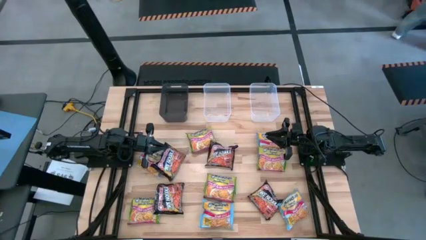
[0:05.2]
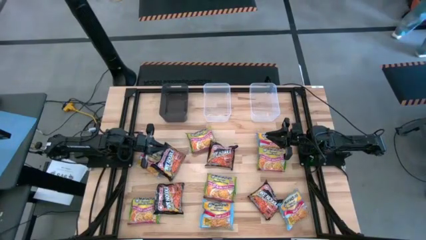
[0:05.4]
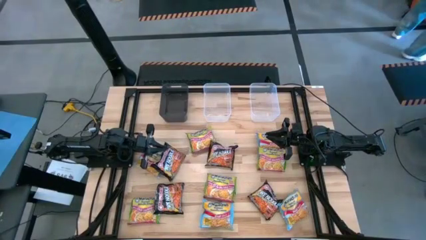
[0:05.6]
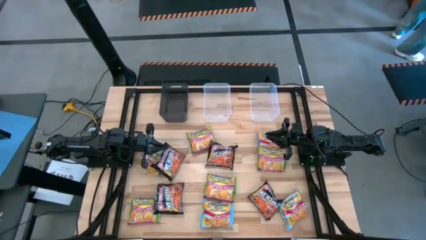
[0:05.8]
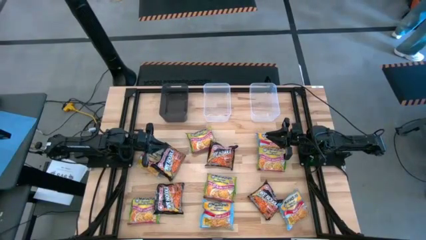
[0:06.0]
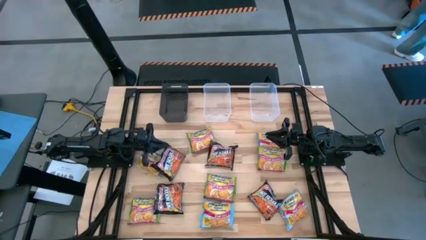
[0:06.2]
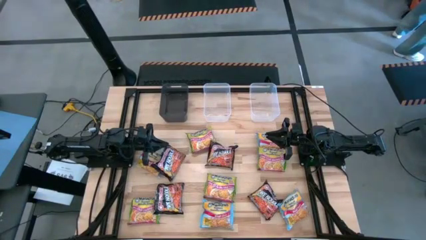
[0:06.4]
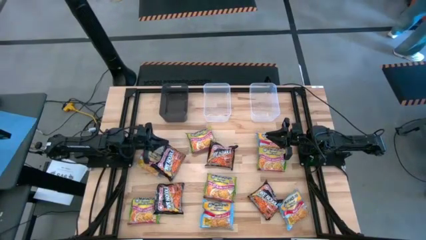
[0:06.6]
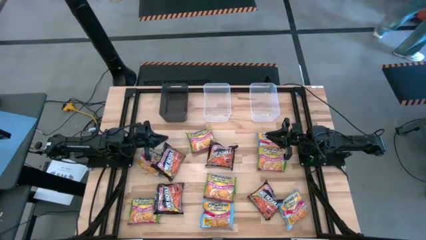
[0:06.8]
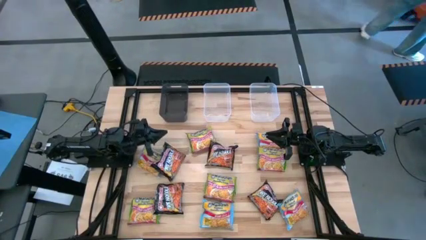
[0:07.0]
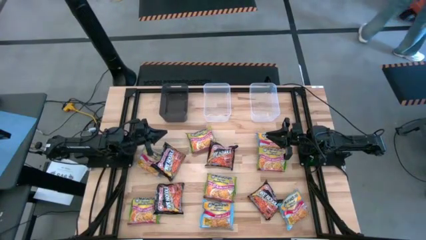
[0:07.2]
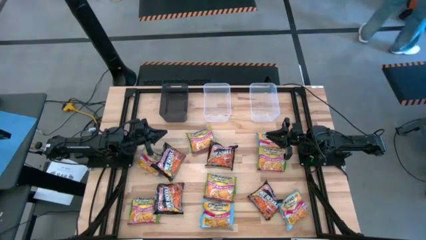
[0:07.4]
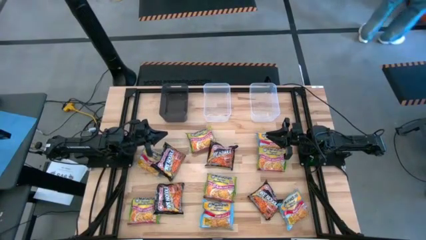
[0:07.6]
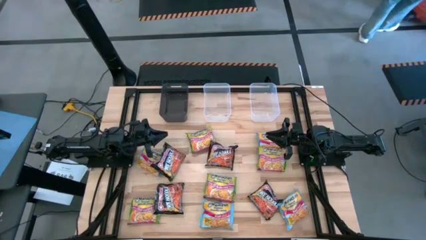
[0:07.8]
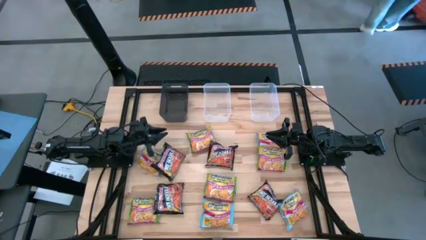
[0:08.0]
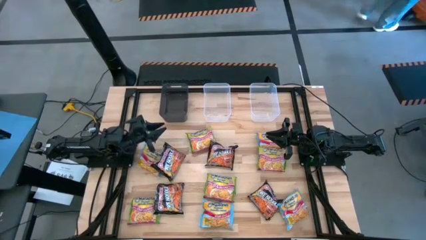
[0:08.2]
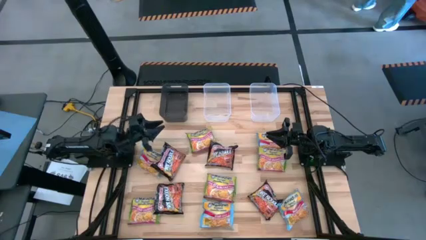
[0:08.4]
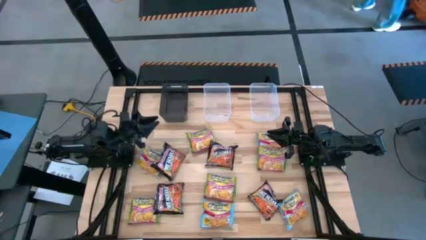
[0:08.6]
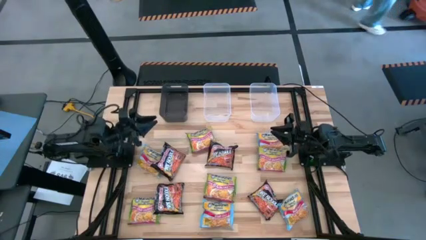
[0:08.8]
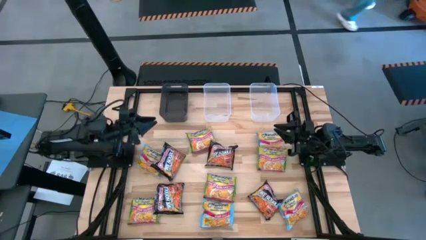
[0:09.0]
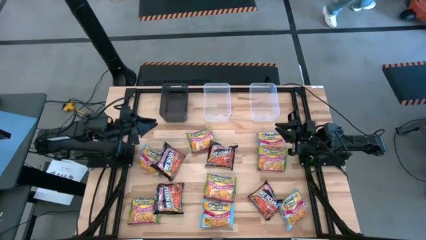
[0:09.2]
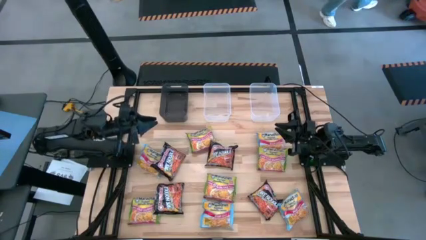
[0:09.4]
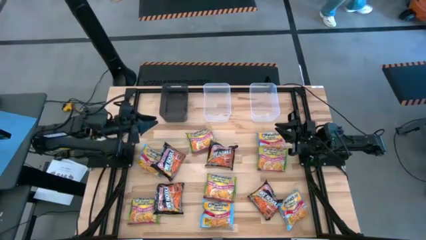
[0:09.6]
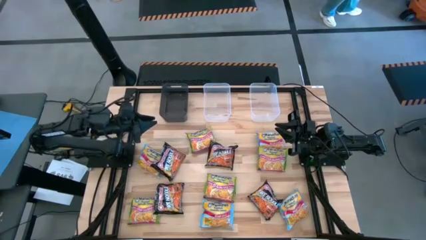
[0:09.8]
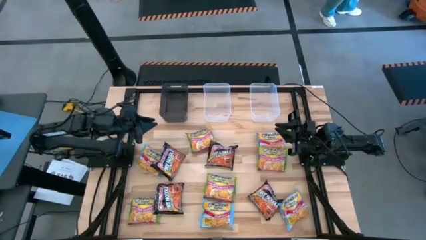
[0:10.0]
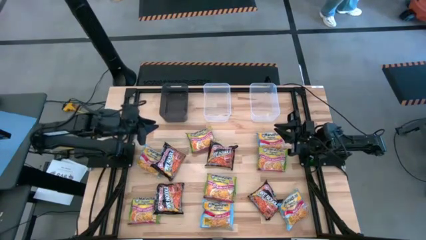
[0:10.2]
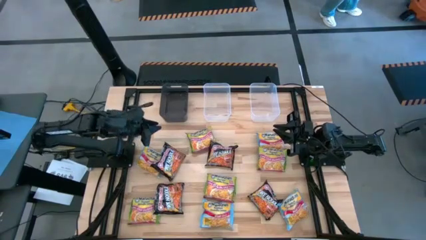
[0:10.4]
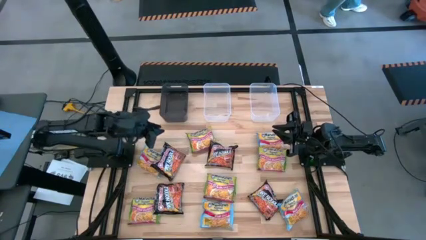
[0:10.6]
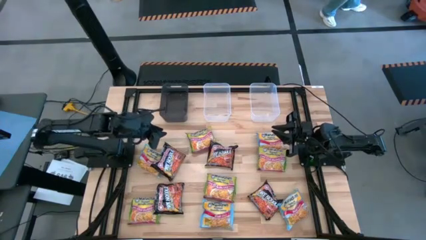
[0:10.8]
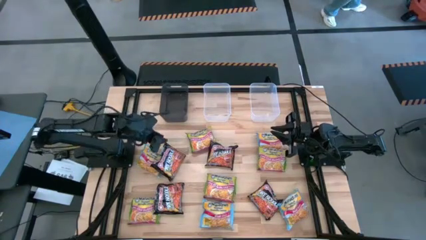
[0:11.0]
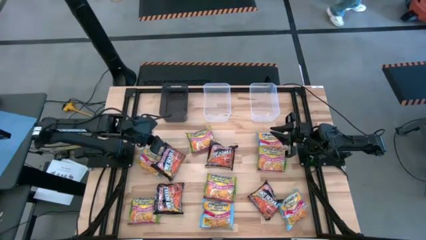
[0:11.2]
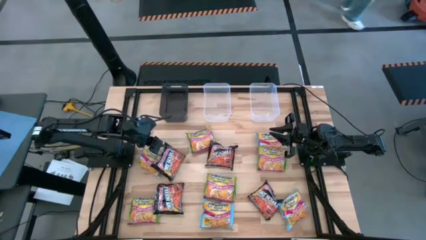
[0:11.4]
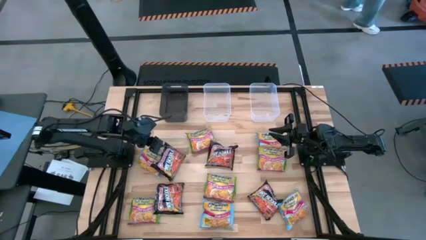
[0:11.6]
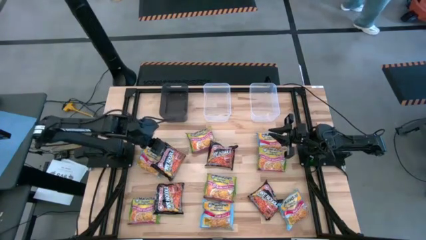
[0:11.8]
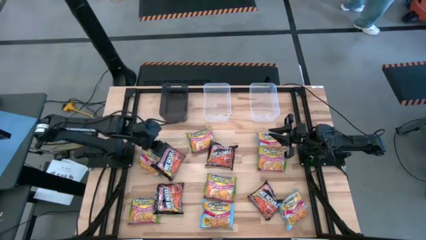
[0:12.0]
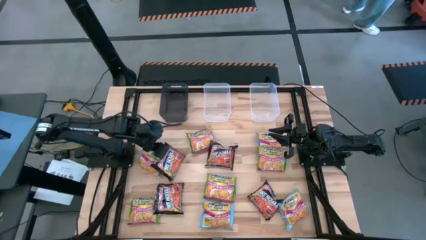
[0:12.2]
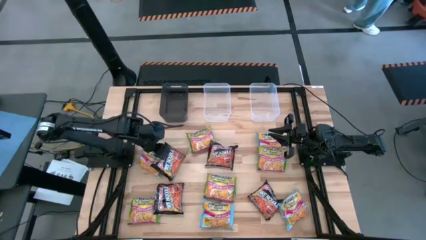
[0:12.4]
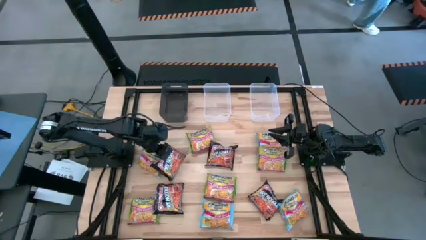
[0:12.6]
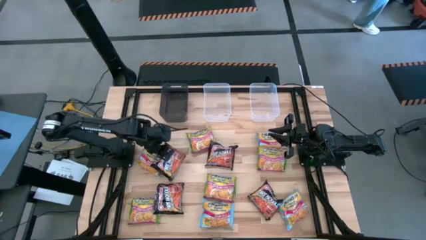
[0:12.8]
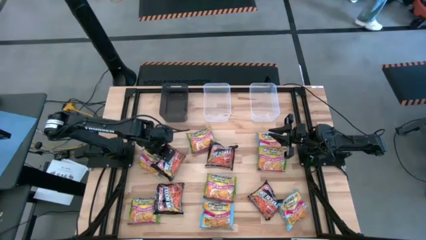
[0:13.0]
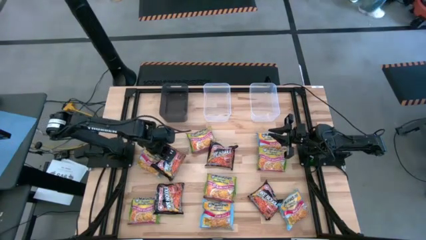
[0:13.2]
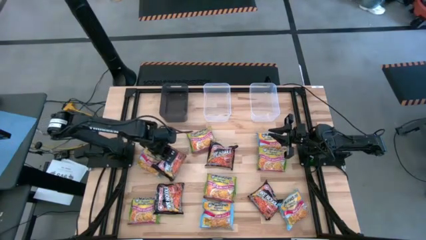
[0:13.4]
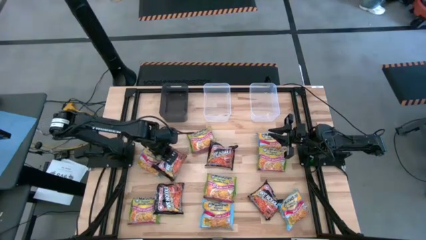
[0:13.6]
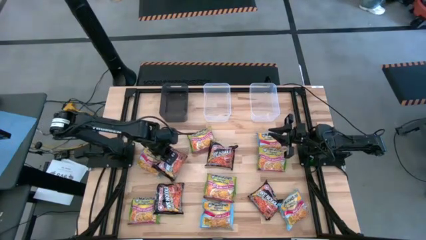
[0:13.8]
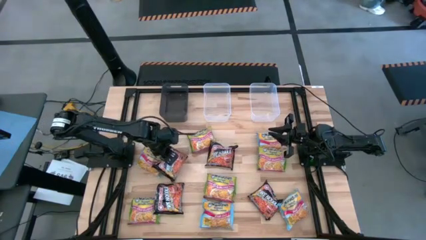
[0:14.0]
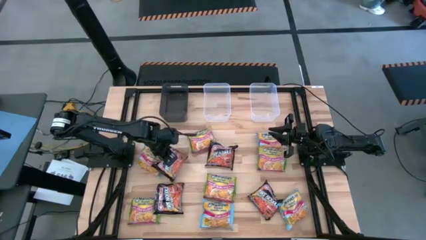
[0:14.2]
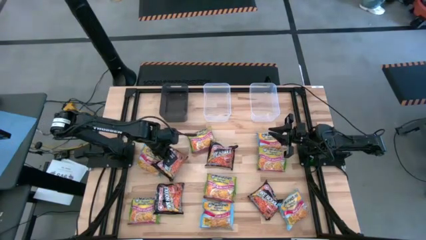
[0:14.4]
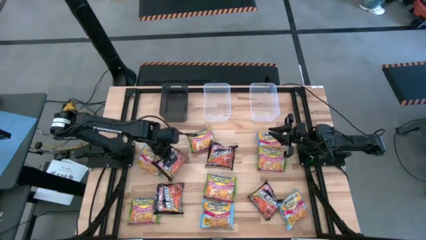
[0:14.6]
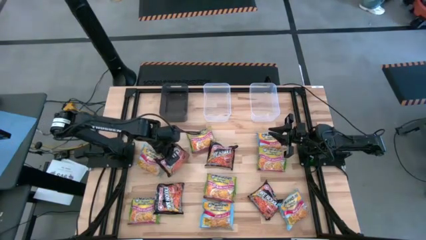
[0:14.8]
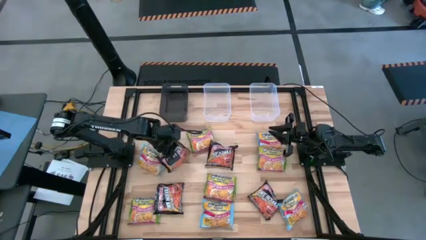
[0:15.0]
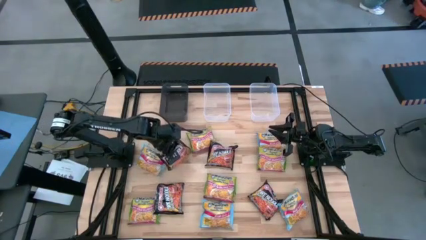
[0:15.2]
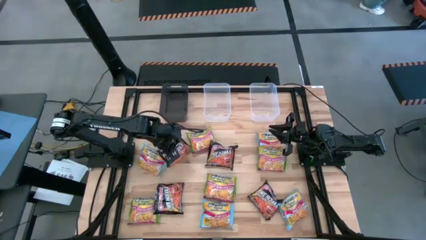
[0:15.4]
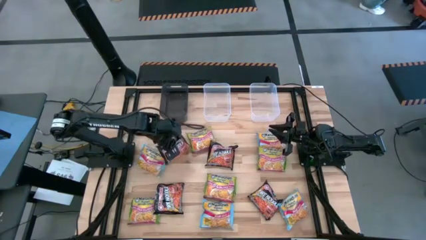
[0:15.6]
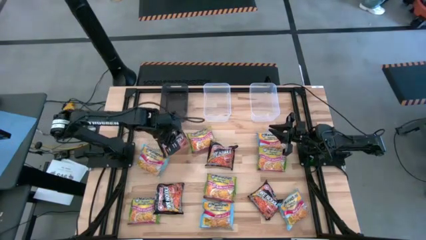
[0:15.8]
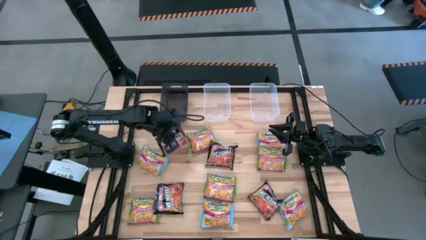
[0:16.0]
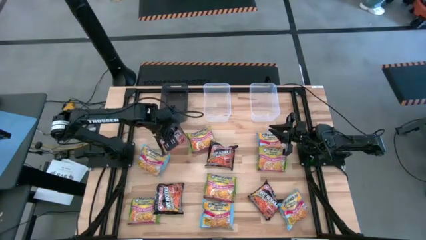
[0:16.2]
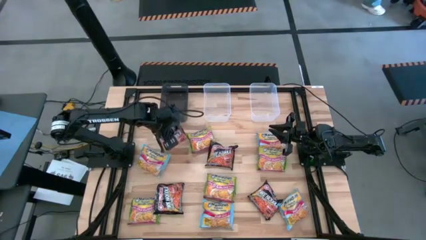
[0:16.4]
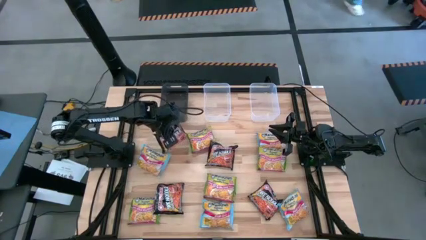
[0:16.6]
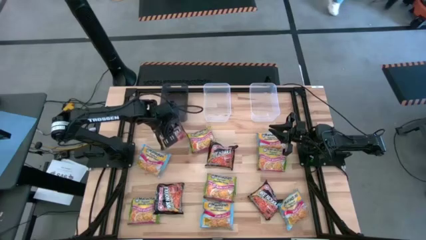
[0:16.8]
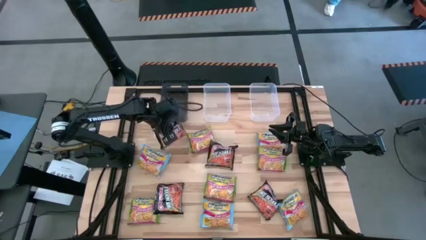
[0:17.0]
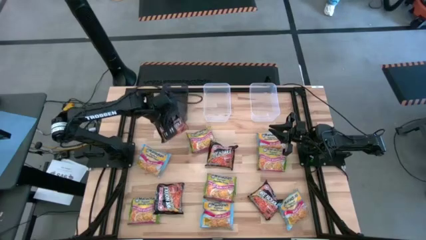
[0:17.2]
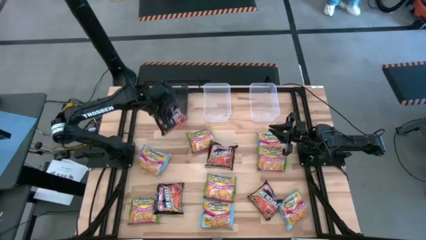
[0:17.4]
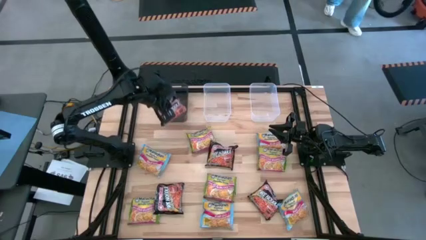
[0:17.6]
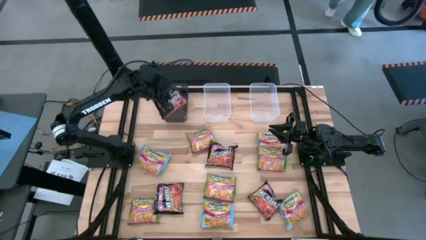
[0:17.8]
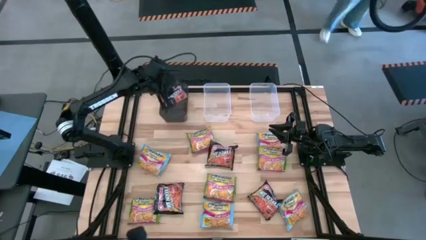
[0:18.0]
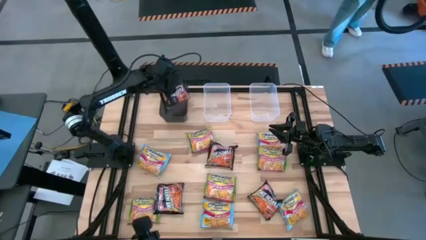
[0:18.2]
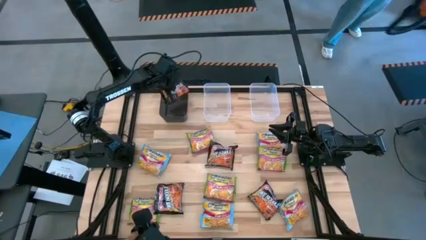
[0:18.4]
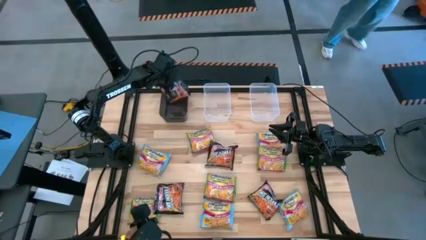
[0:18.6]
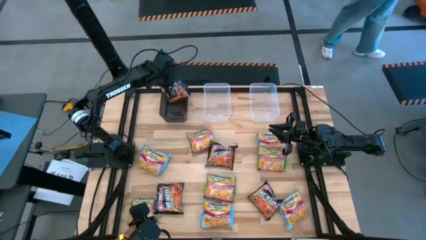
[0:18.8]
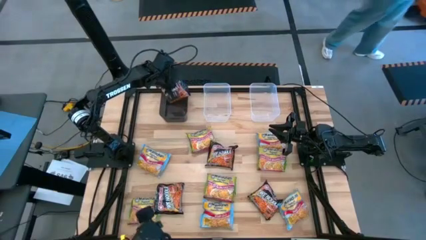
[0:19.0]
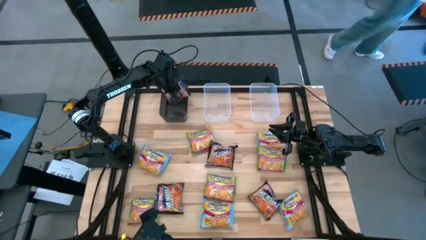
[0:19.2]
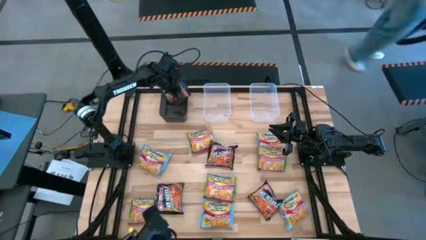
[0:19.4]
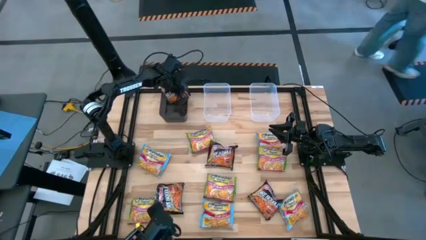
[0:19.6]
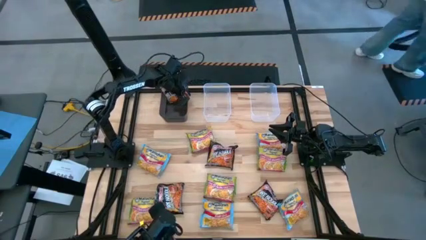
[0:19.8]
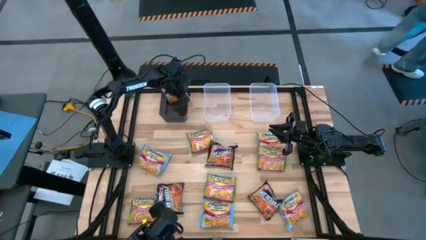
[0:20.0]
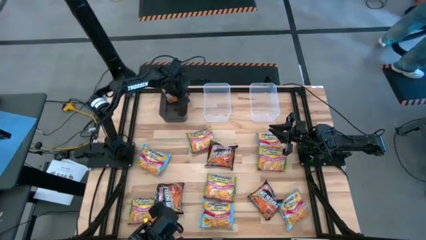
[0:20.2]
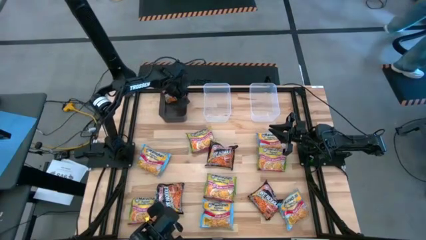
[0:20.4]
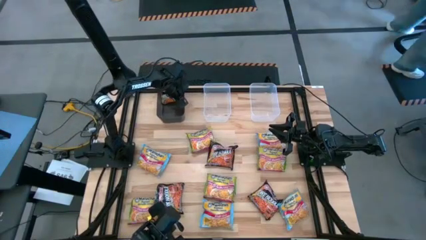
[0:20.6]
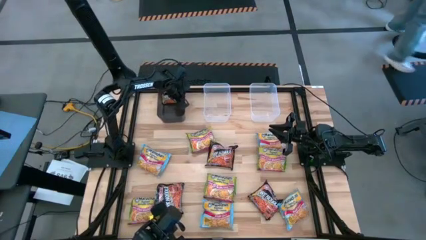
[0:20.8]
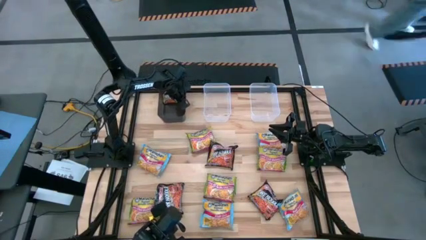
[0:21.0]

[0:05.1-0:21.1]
Task: Sort Maruchan noodles
Put the top left black noodle pack into the black bin
